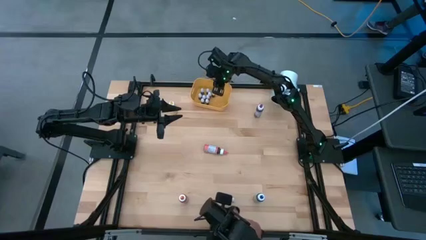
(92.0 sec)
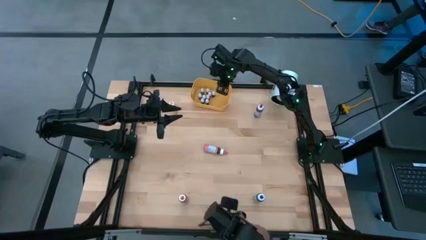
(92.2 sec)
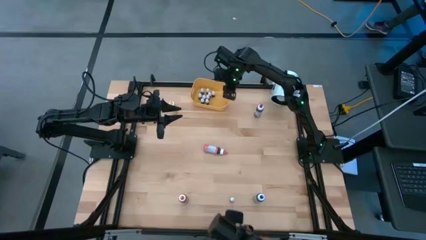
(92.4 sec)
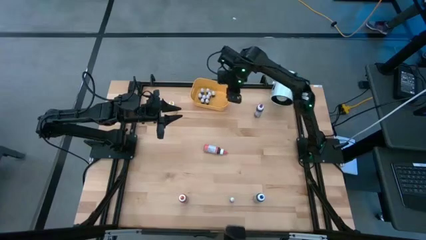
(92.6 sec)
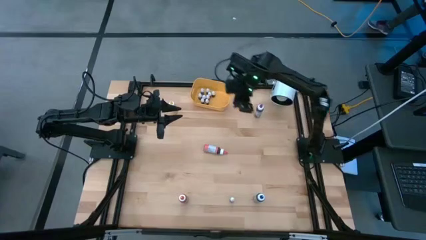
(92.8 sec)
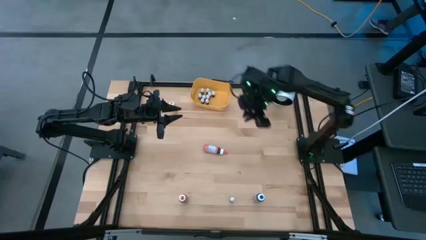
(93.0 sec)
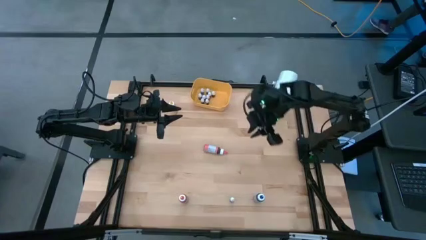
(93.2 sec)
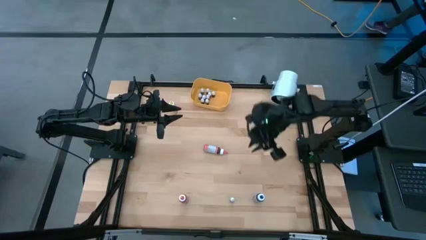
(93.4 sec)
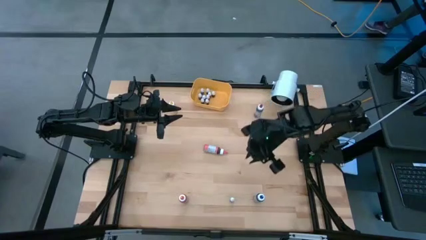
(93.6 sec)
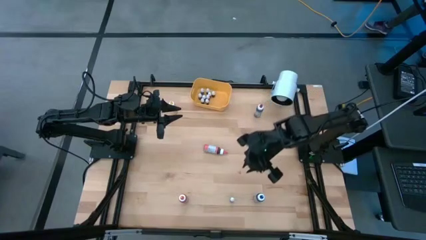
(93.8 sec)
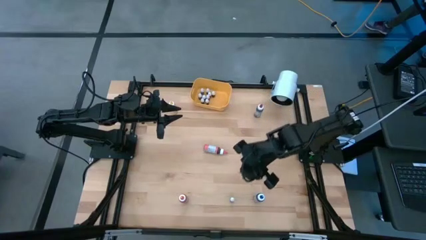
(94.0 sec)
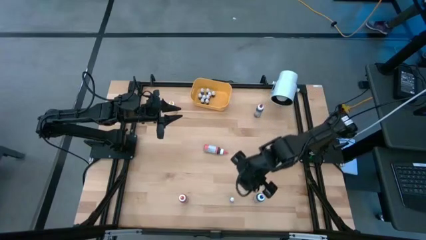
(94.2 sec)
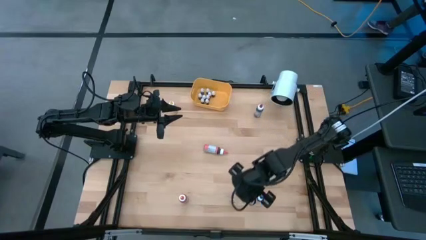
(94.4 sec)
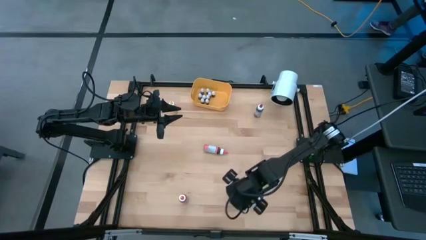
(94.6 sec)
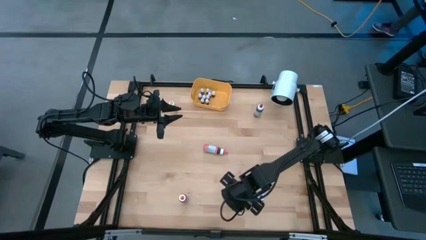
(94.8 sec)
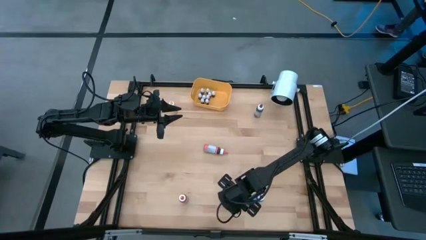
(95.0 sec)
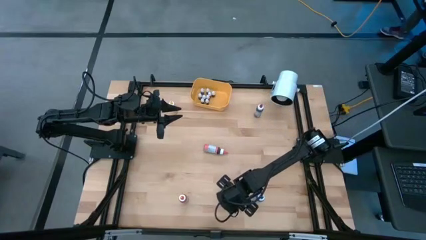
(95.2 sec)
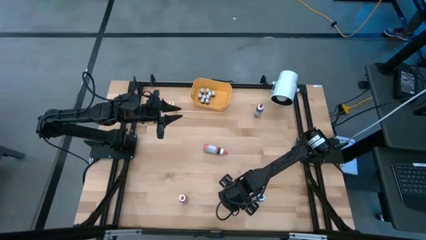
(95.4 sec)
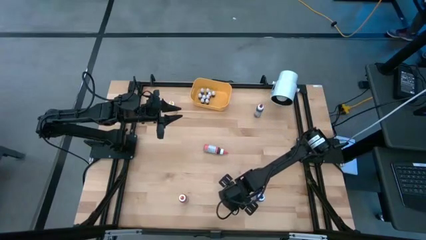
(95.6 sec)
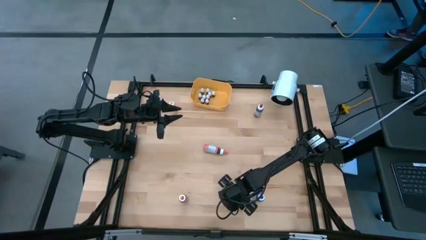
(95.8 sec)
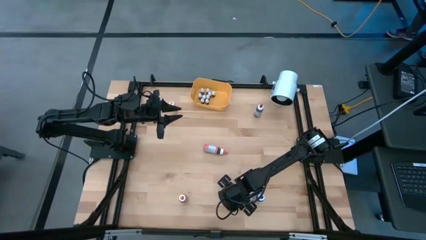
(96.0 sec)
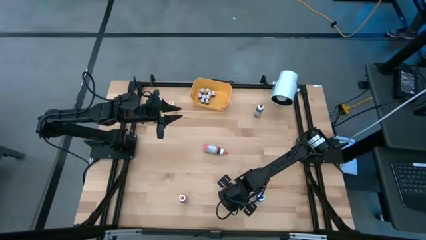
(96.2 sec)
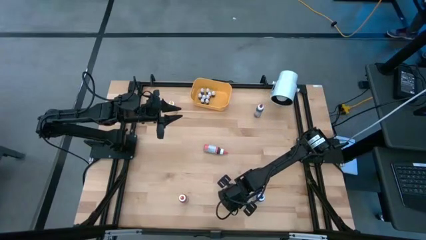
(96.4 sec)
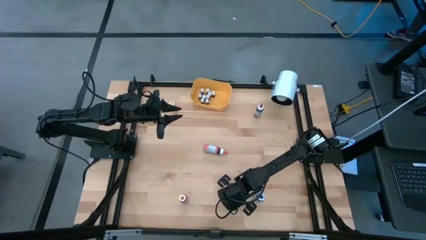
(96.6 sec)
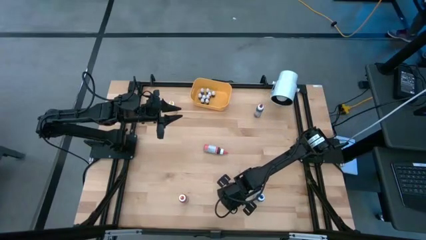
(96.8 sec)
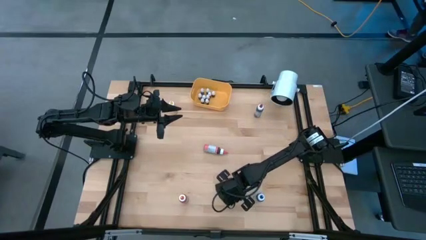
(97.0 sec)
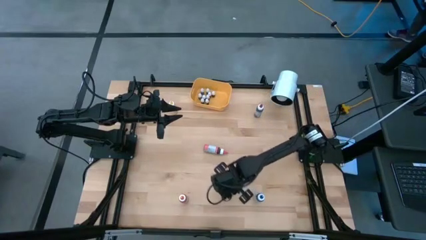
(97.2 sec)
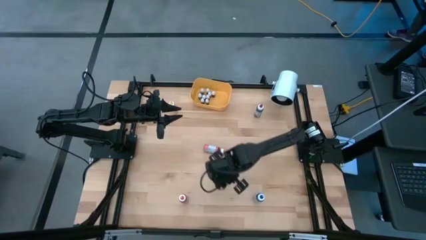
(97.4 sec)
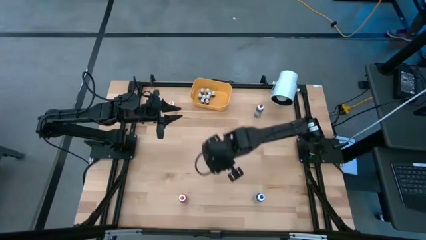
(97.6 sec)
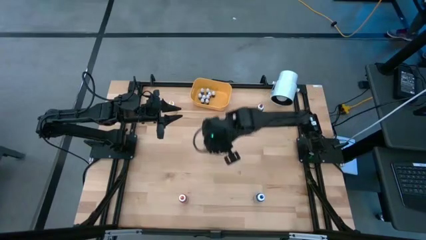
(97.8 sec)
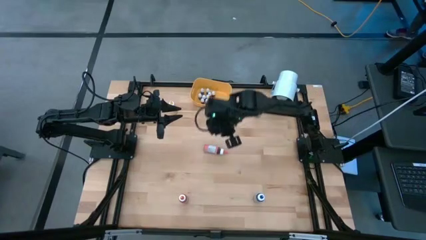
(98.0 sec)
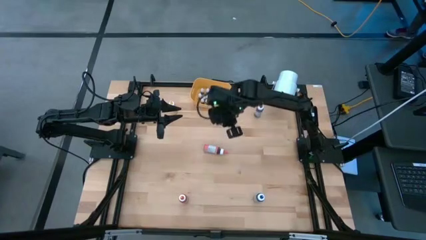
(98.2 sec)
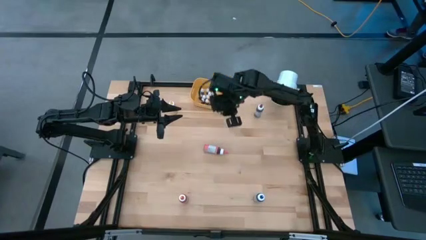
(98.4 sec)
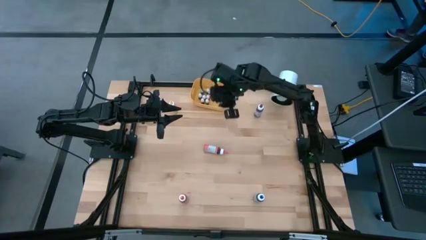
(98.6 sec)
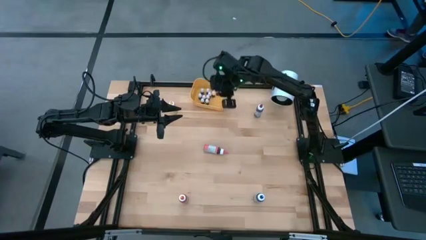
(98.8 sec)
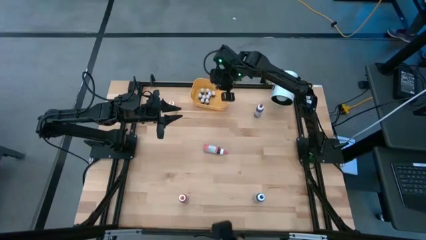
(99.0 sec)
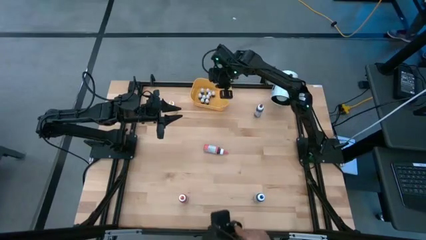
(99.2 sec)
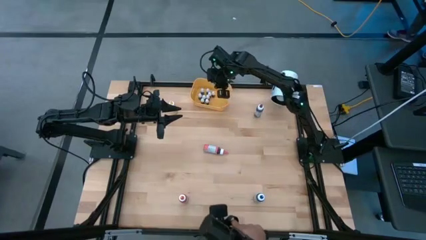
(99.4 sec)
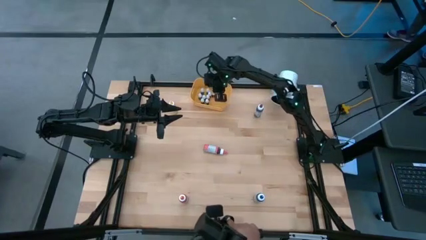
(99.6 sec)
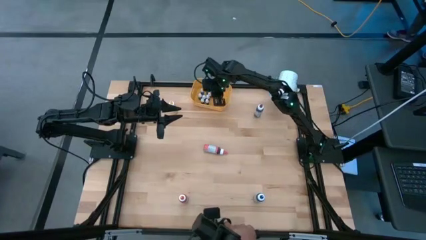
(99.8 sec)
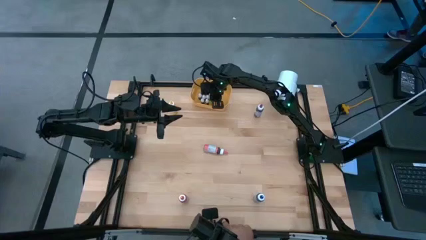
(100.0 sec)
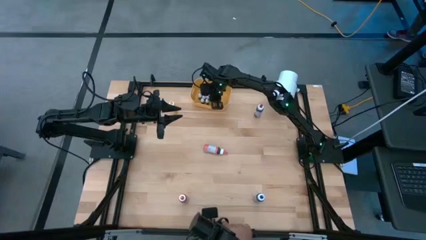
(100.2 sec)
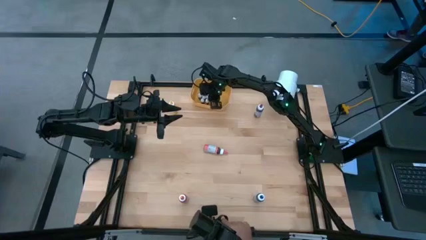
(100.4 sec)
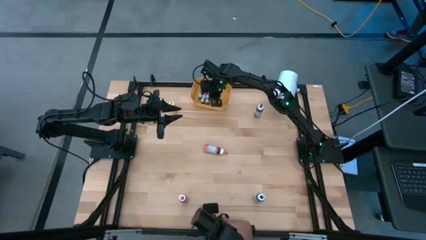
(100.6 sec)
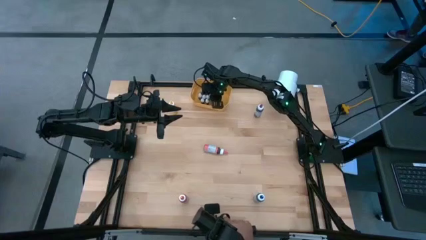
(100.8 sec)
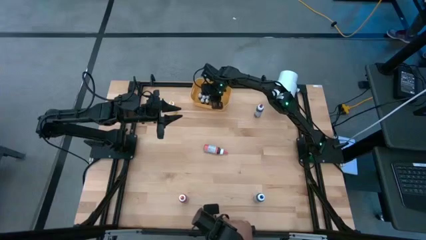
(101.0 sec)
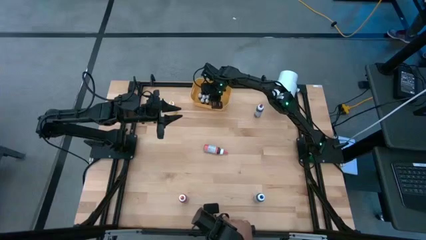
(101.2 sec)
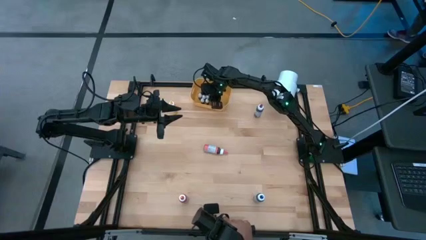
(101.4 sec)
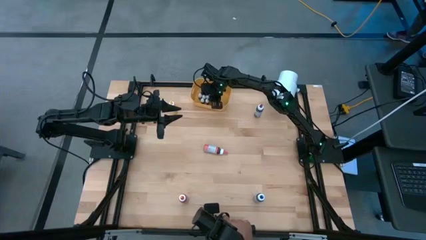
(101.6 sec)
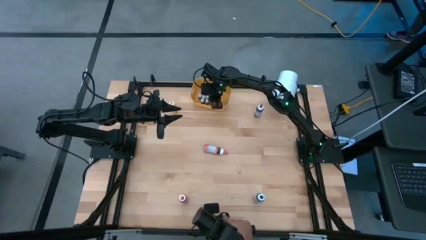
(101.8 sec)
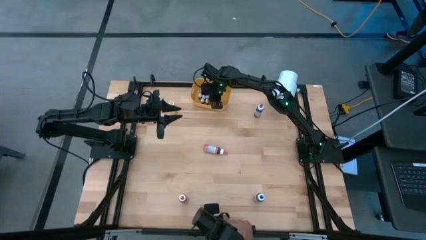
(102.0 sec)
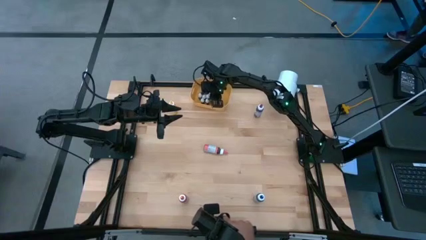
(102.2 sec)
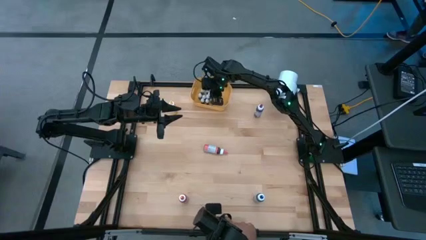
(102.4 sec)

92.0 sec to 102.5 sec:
Task: Pick & Place food coloring
Put the small black food coloring bottle into the bin

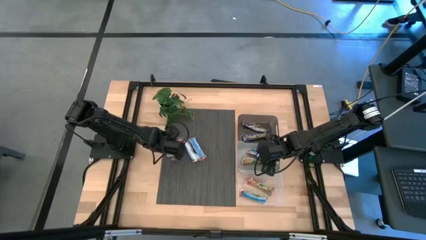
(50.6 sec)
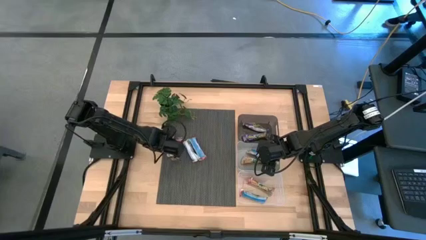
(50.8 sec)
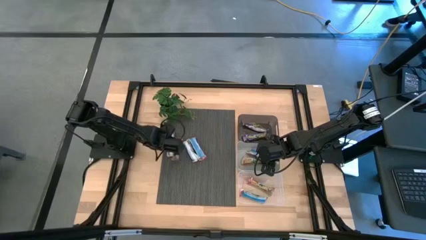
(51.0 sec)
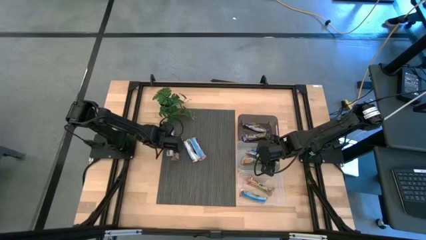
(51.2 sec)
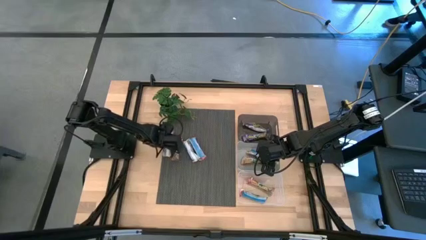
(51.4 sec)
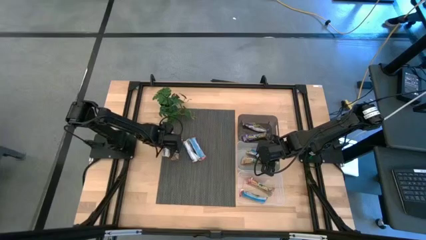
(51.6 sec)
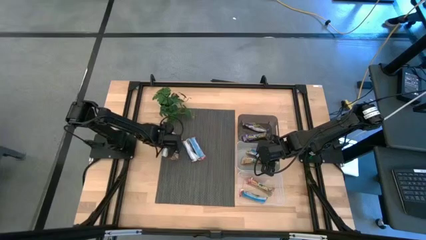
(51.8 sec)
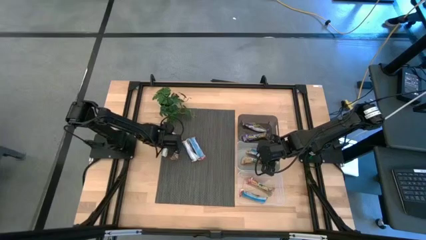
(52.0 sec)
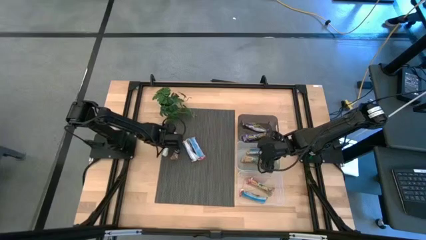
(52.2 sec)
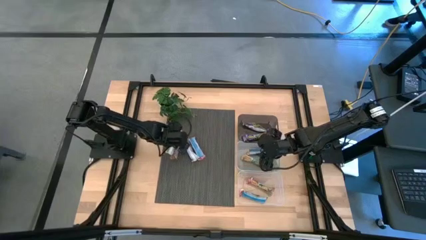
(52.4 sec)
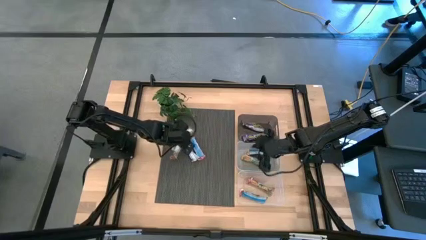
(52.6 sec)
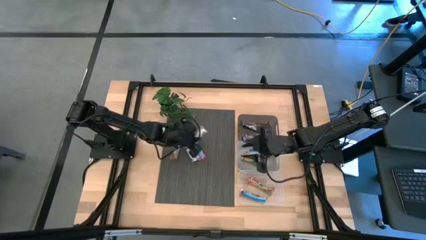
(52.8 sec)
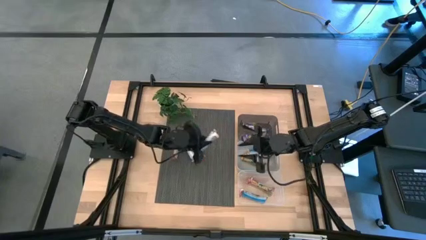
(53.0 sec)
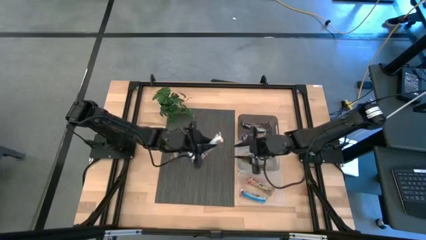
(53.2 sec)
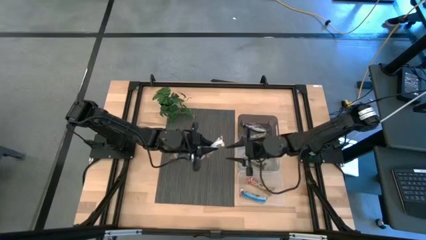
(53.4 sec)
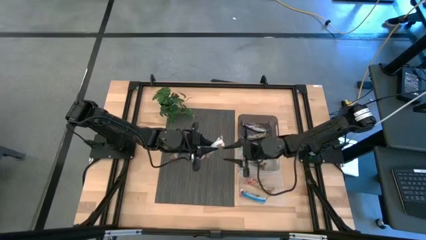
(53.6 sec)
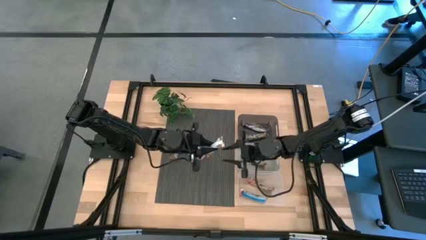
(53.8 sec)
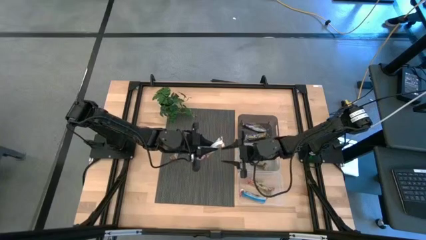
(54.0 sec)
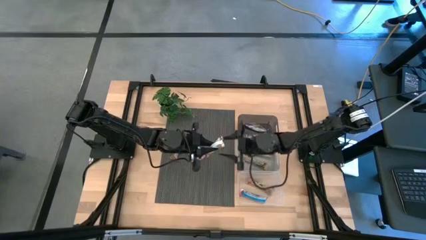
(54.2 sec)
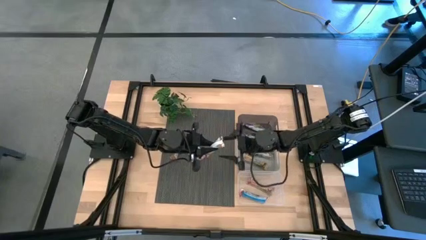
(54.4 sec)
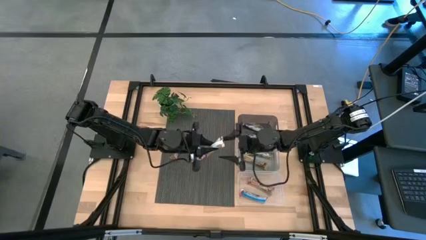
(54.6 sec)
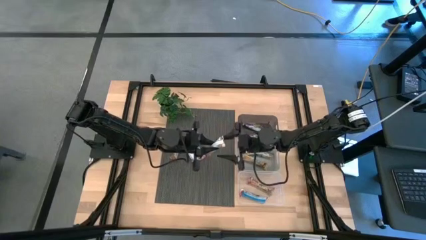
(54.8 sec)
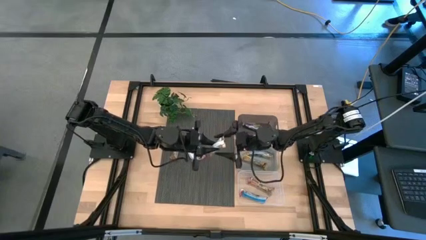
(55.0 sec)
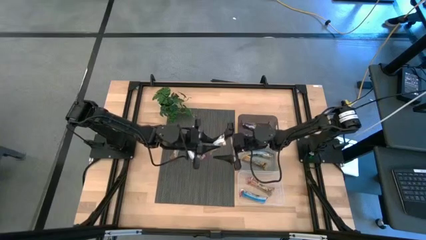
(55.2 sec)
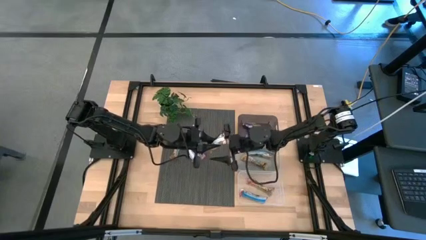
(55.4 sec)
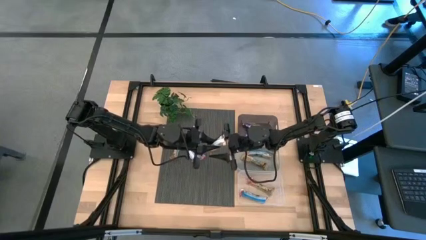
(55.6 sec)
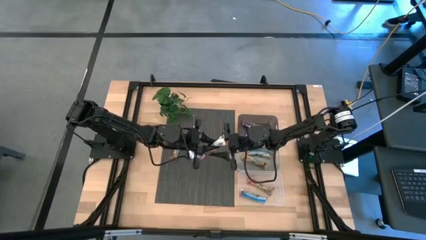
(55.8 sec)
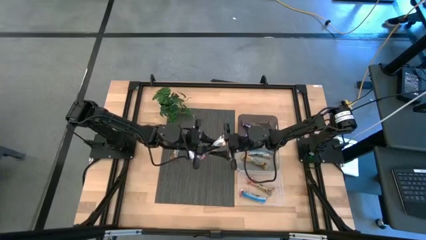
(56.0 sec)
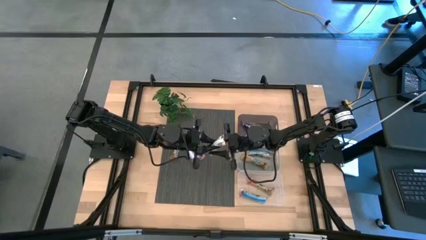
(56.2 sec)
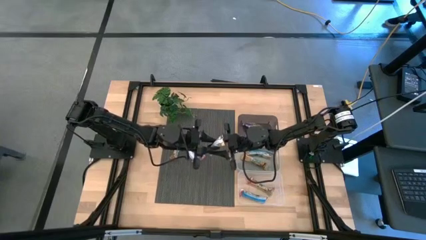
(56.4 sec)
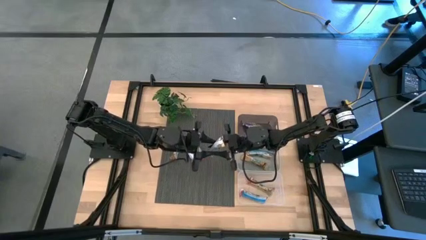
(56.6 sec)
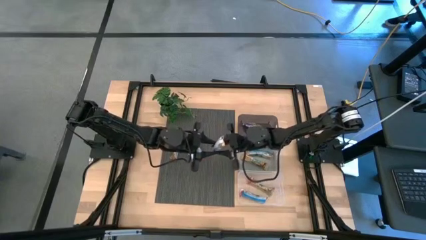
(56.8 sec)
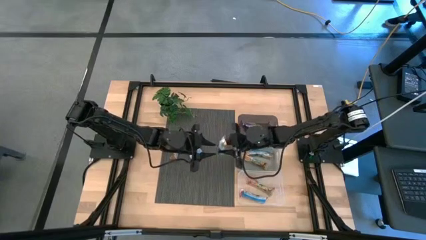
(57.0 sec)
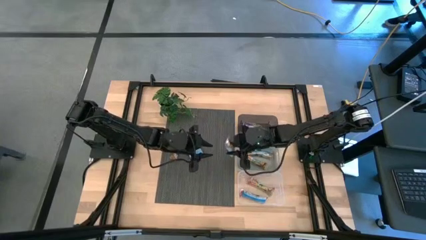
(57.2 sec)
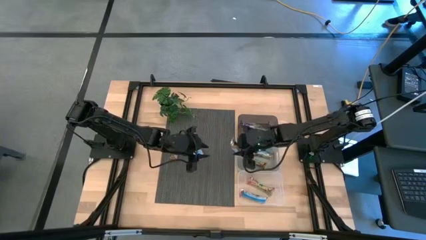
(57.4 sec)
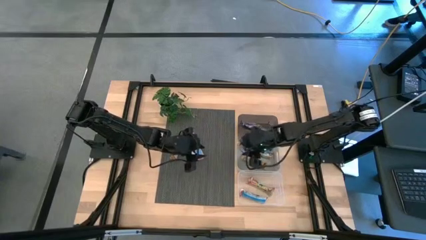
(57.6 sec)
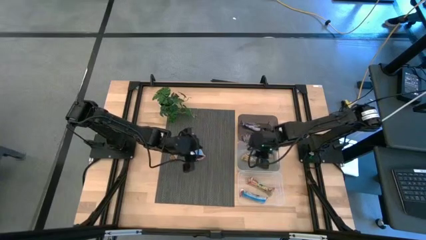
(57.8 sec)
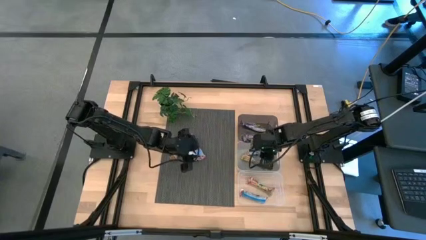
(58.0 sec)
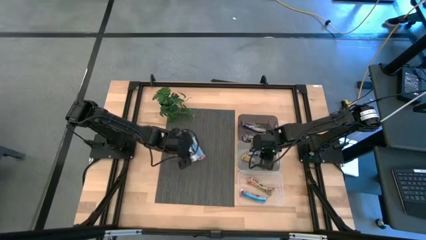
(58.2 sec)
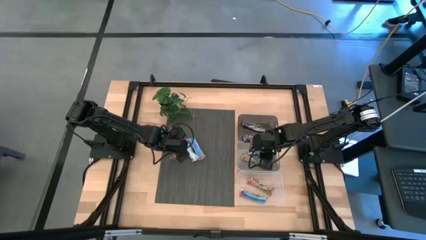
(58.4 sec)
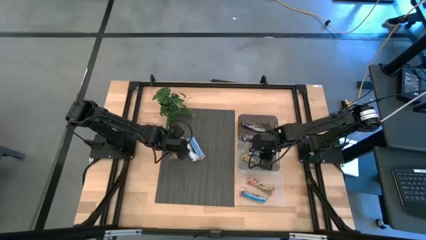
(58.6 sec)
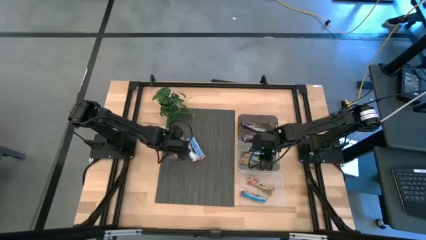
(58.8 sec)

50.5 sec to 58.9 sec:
Task: Pick and place Granola Bars by type
Put the yellow granola bar into the gray bin
